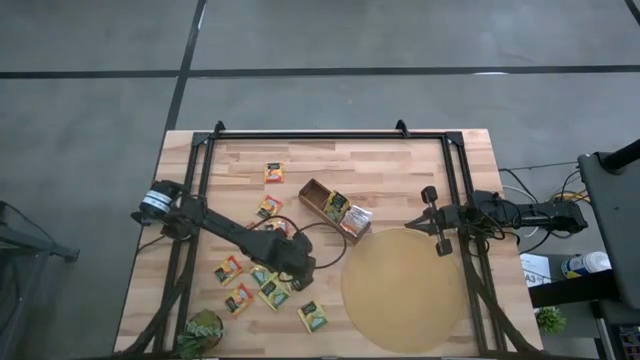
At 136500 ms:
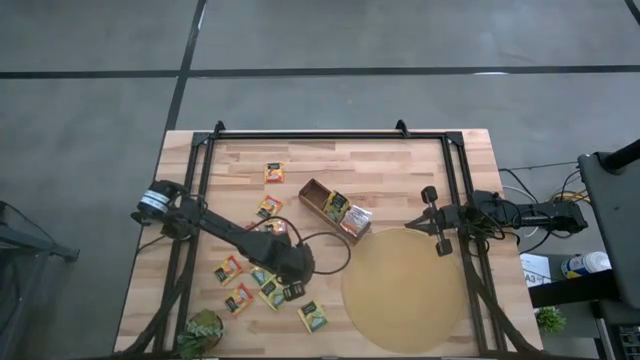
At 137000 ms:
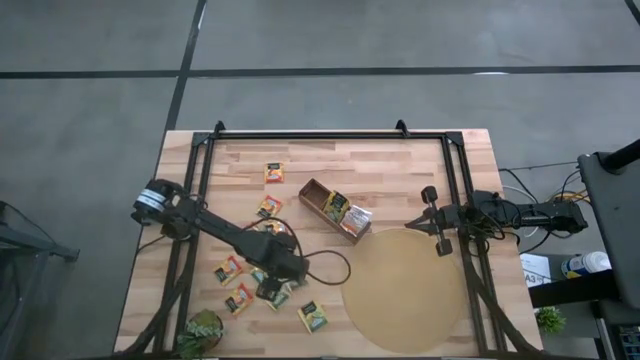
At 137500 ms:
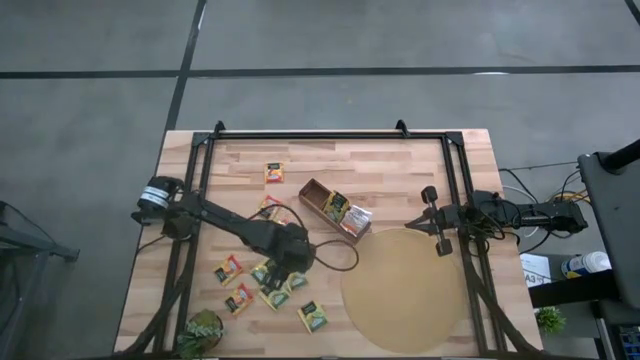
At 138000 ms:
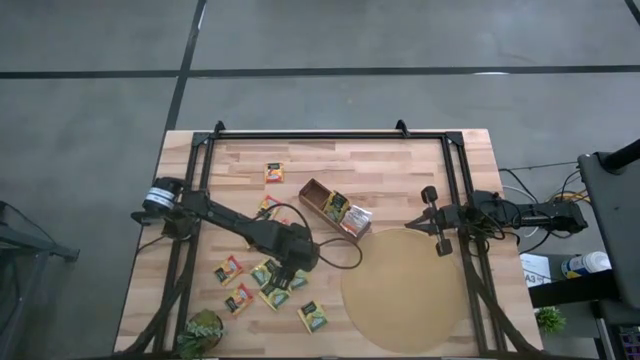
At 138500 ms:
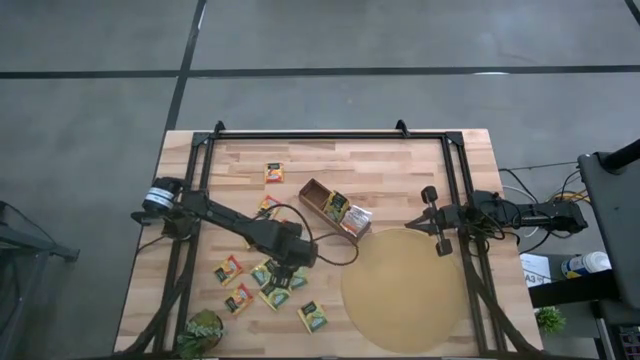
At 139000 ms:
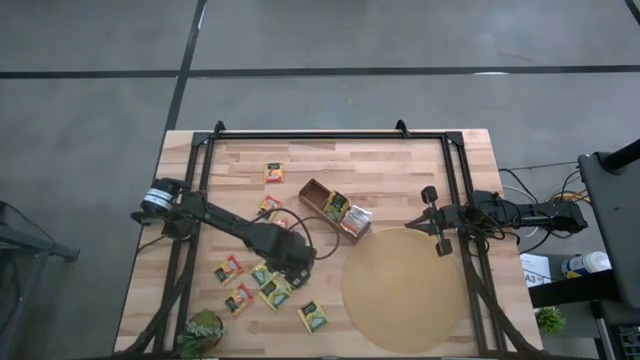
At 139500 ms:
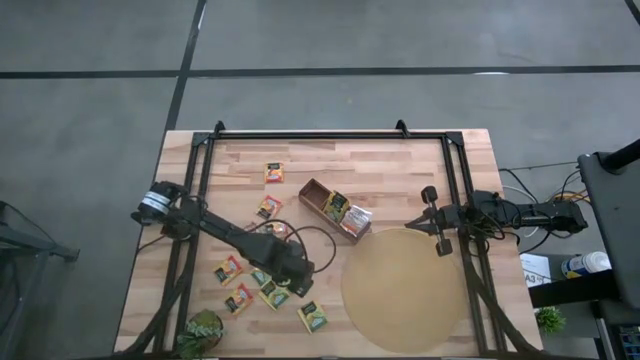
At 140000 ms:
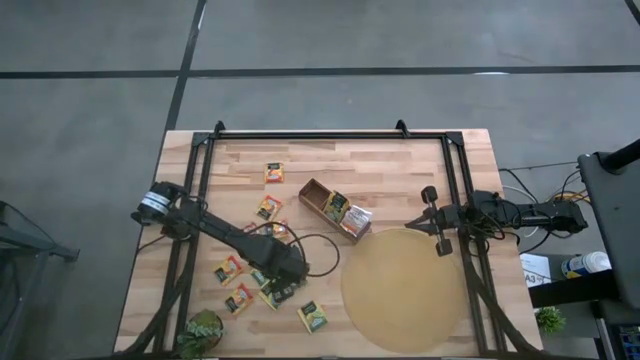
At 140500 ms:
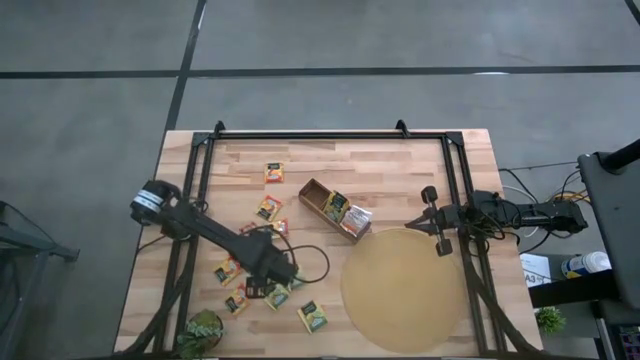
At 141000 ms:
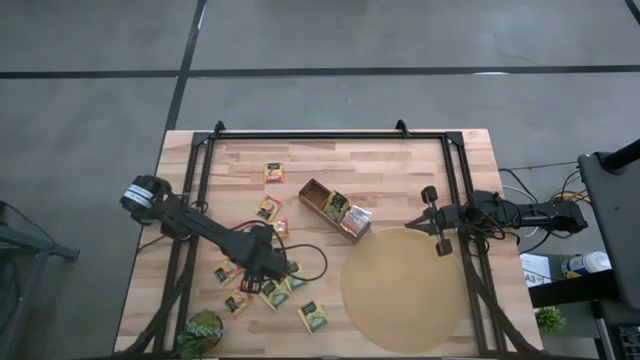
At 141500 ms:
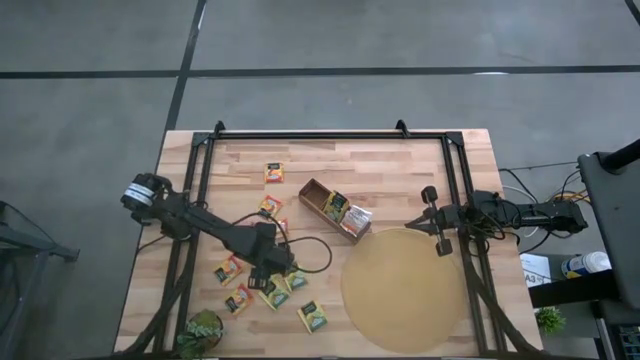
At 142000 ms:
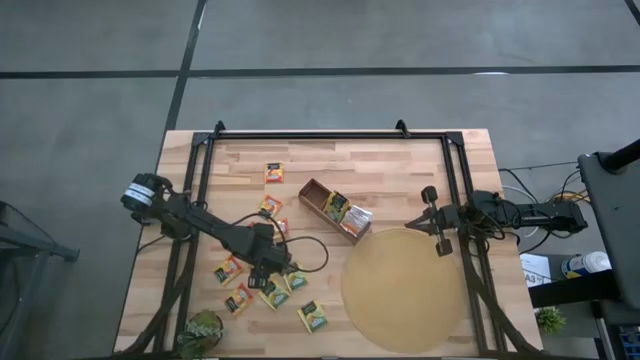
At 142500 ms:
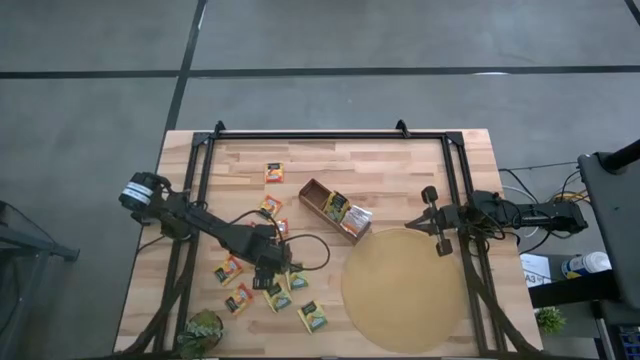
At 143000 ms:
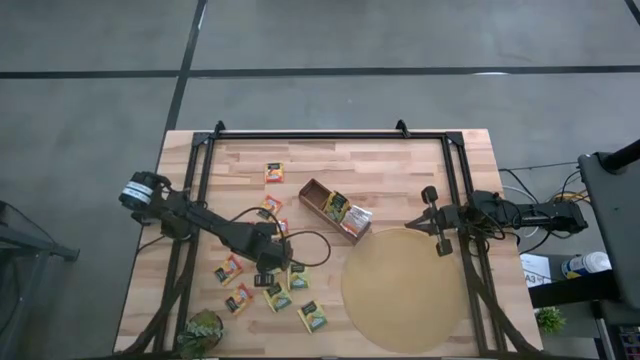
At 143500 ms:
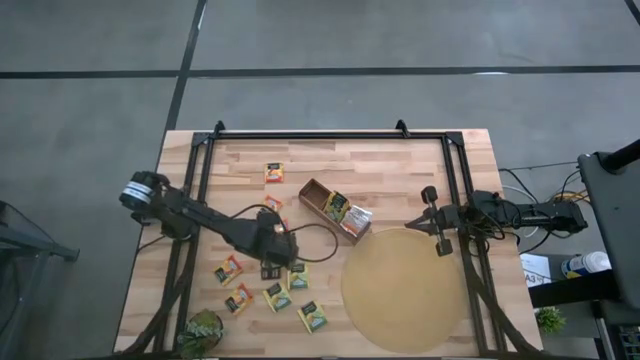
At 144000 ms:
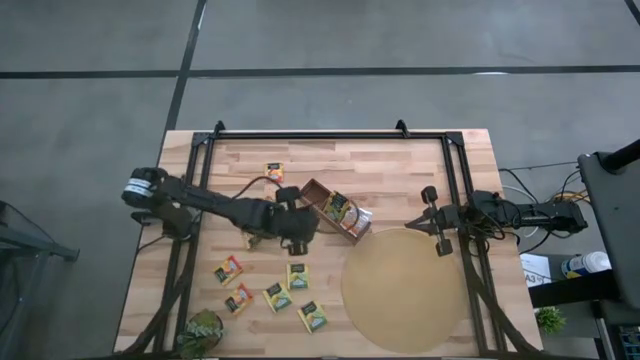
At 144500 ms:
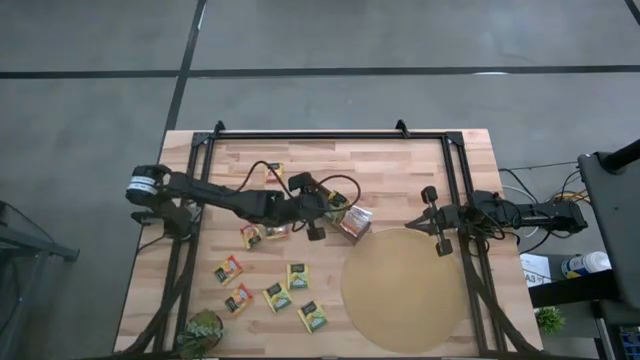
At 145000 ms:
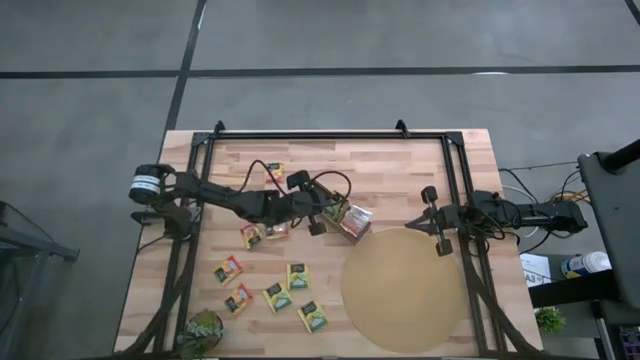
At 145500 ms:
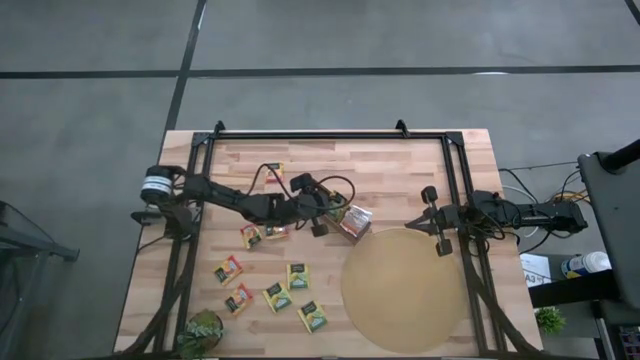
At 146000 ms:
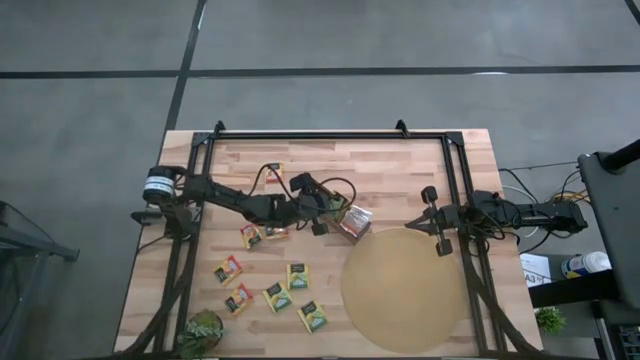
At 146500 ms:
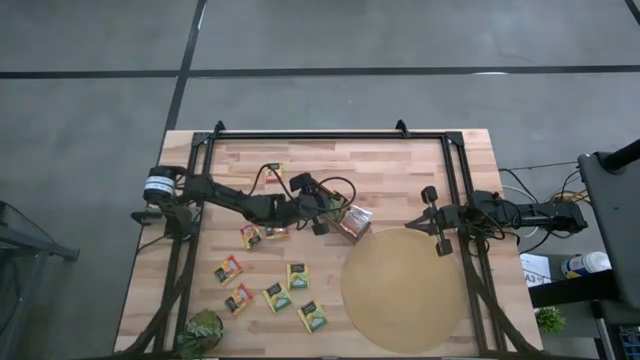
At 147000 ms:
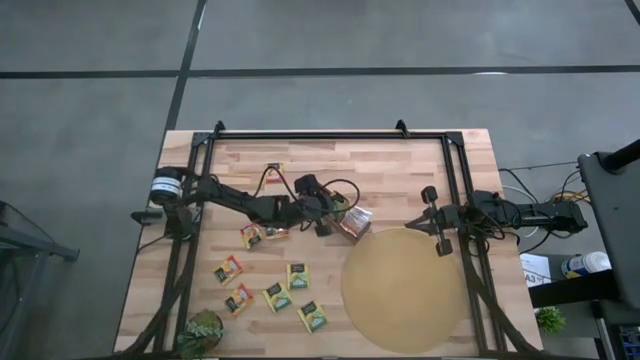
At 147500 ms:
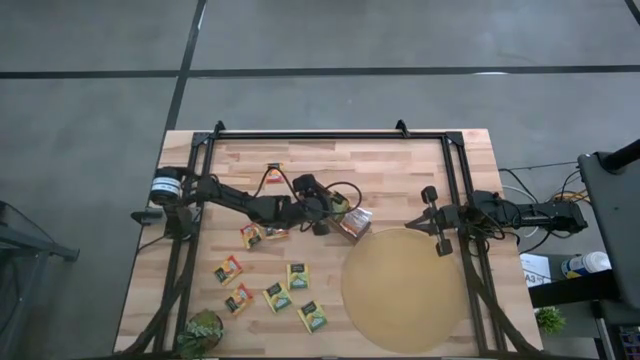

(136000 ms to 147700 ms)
Task: Pick & Place Tea
Put the yellow tea bag into the middle section of the wooden organizer

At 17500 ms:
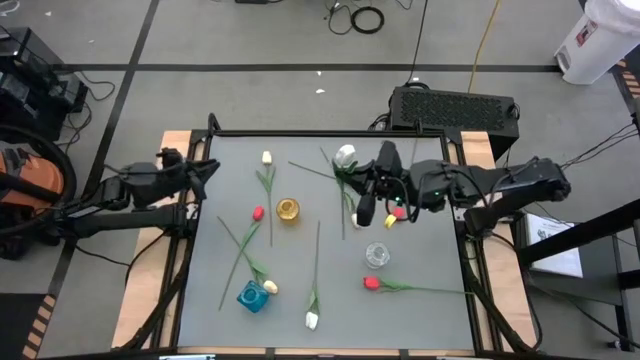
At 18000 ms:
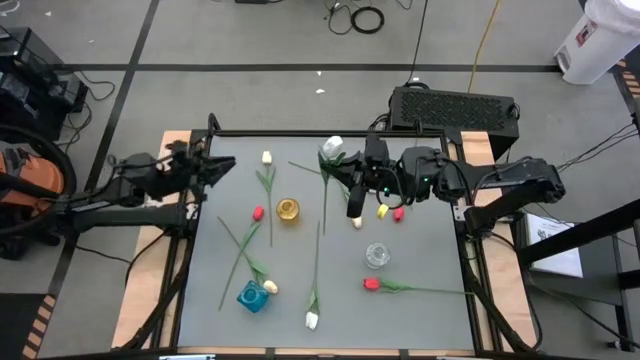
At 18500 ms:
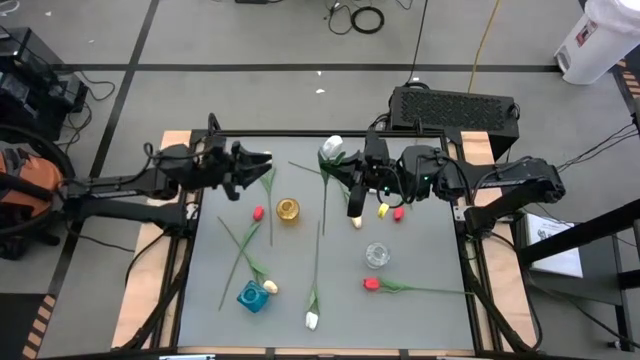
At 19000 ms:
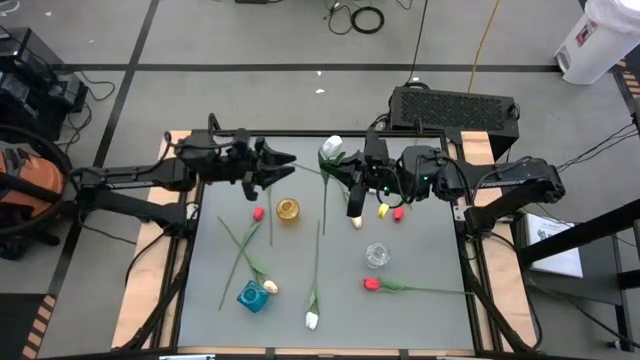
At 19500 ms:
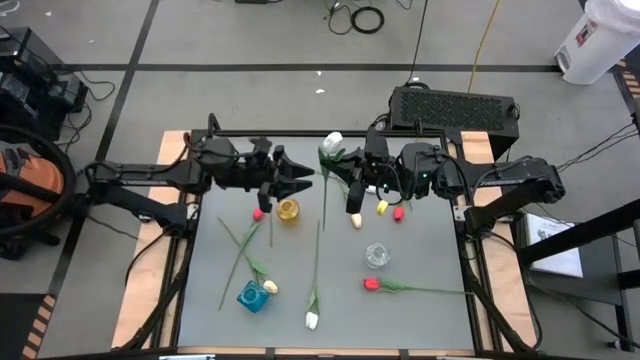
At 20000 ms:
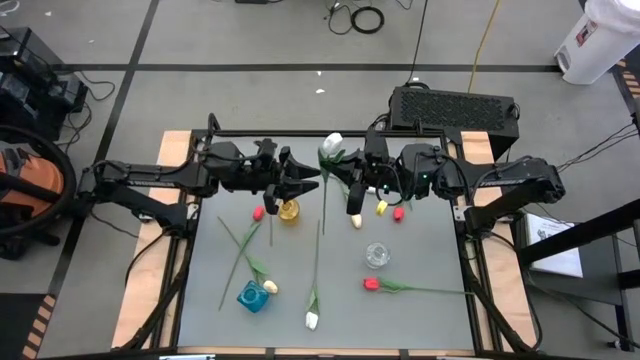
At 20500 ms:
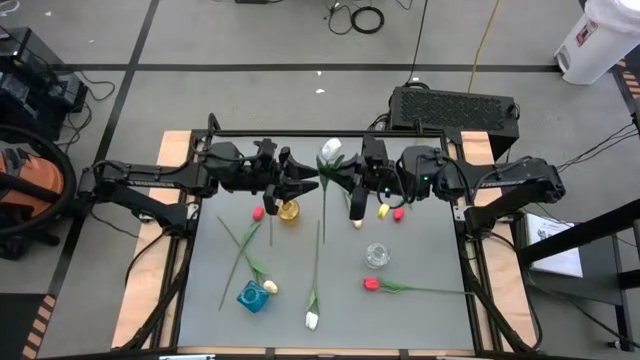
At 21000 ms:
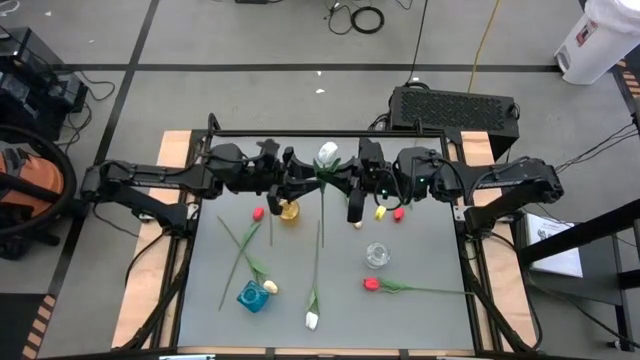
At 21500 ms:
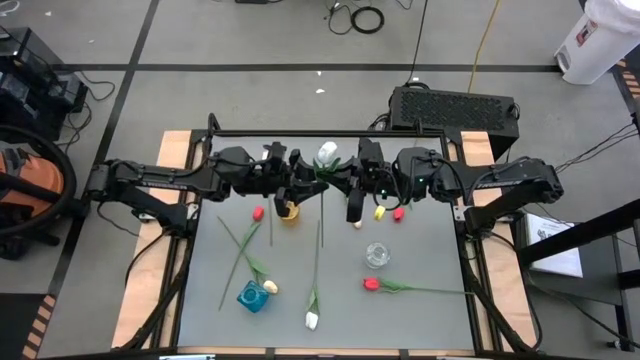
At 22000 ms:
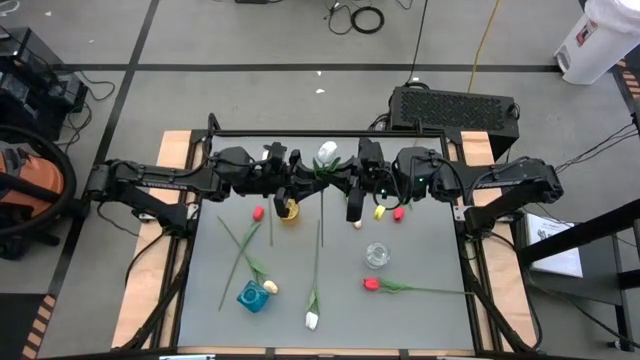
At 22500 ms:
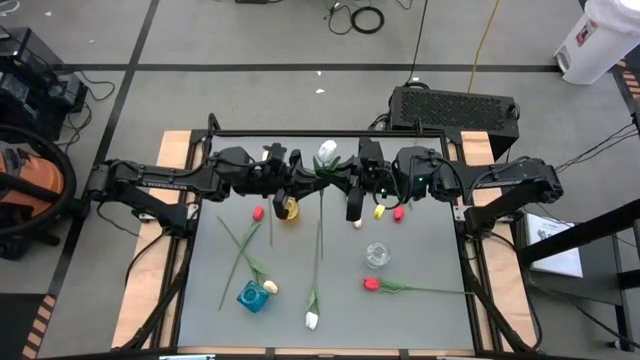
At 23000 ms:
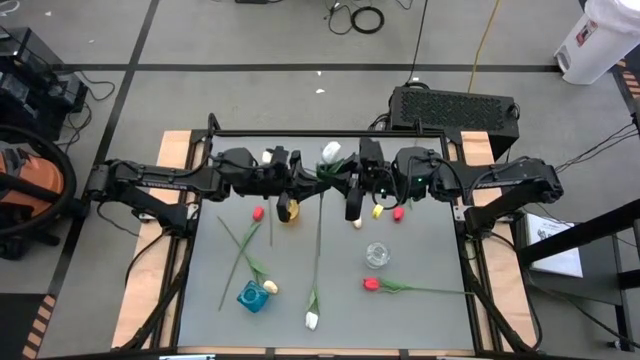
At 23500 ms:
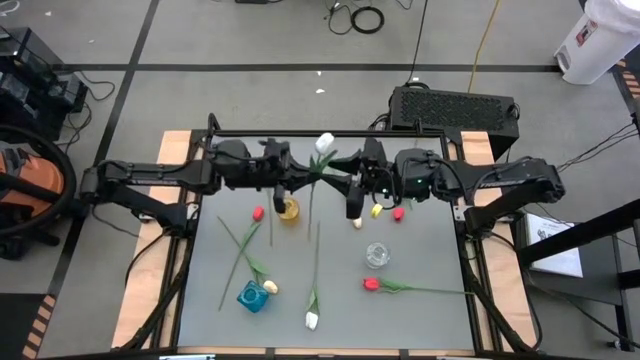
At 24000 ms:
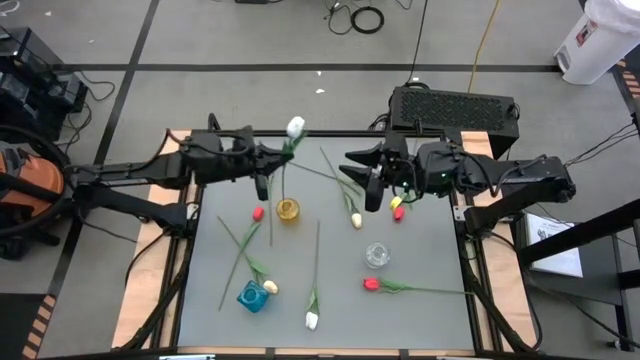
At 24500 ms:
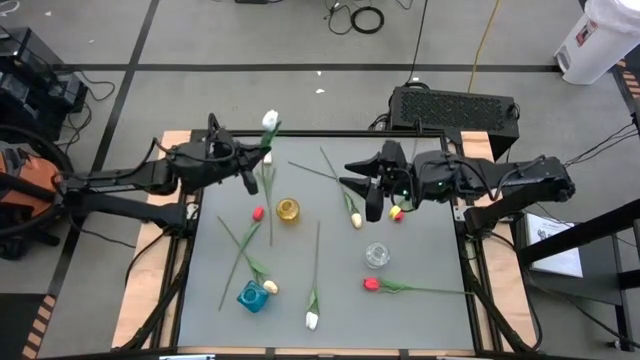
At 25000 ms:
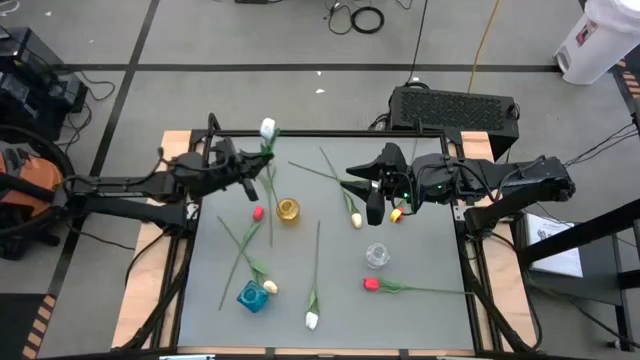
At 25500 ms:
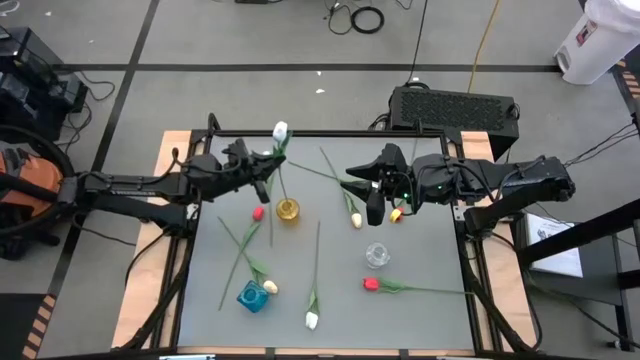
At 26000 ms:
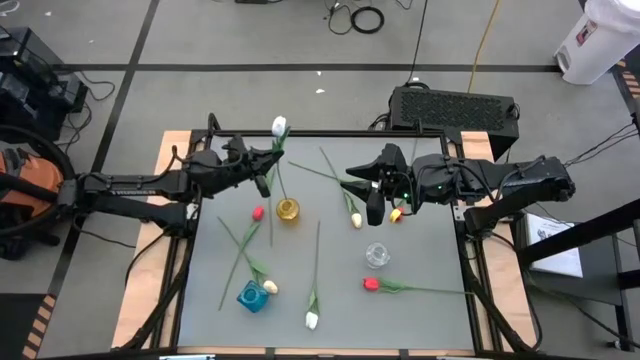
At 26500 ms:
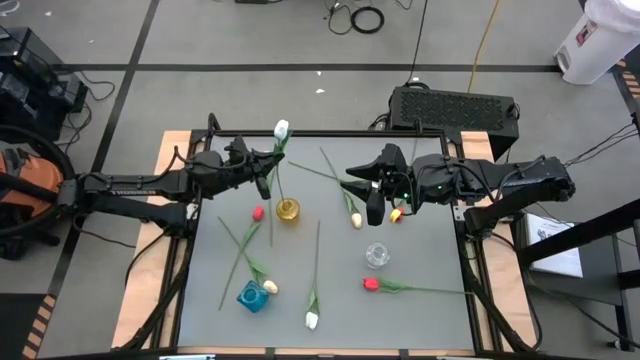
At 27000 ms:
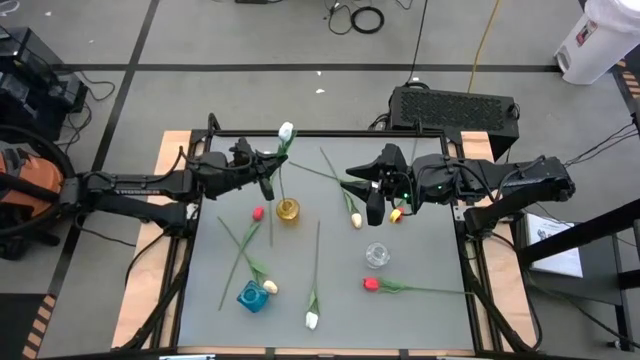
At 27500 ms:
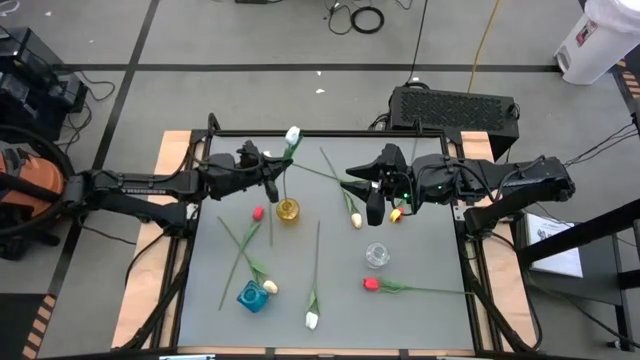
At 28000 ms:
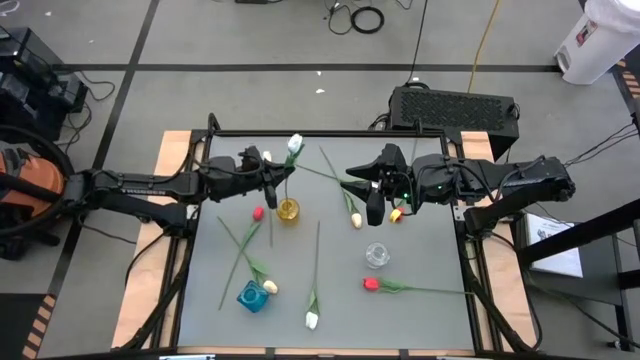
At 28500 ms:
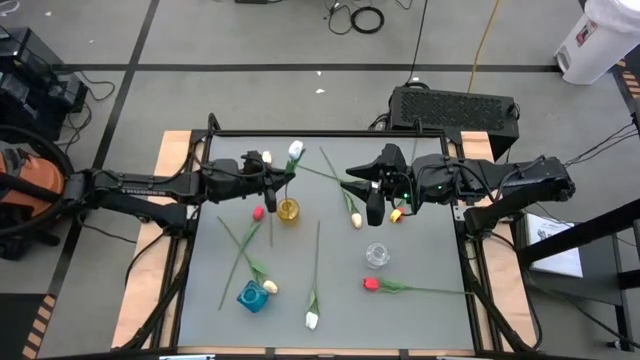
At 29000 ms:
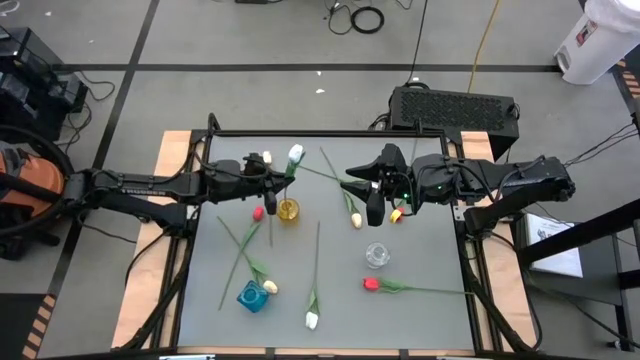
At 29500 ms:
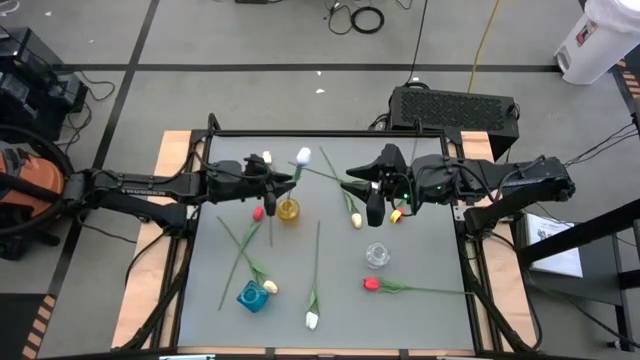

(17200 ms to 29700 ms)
Task: Sort flowers into vase by color
Put the bottom right white tulip into the yellow vase
